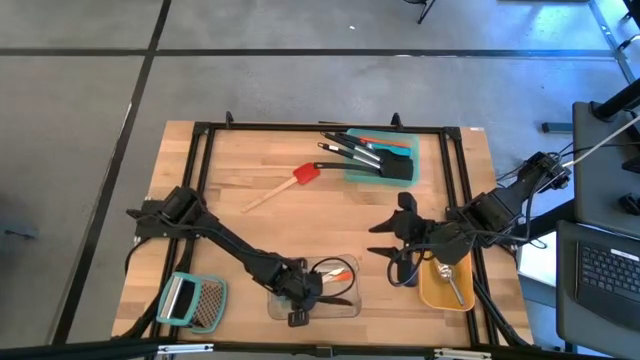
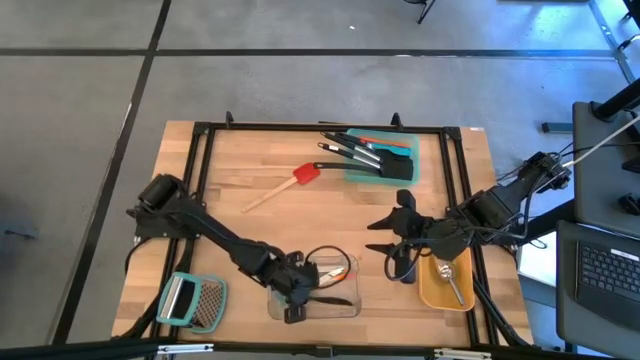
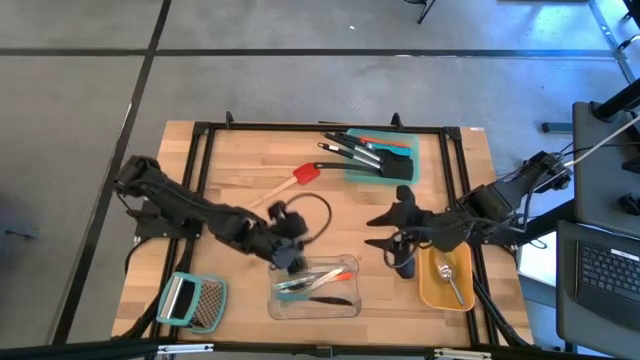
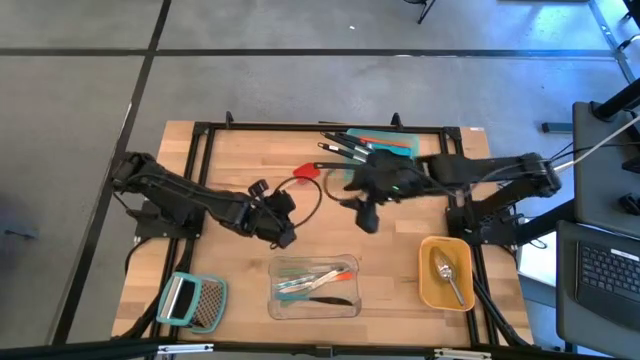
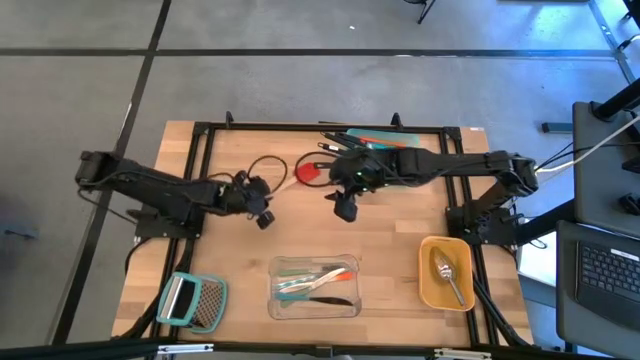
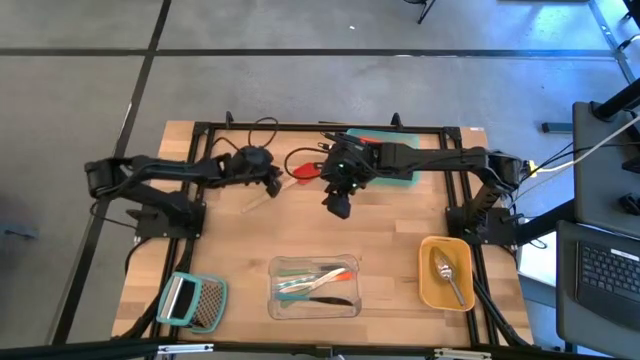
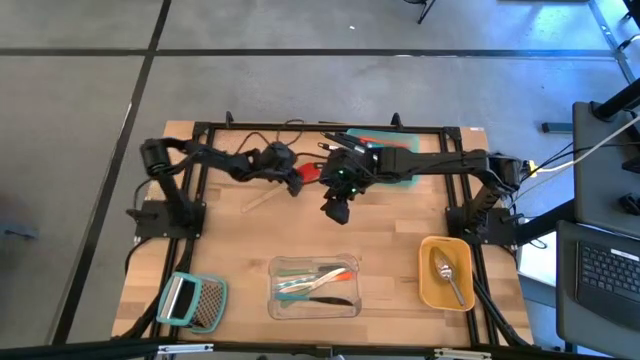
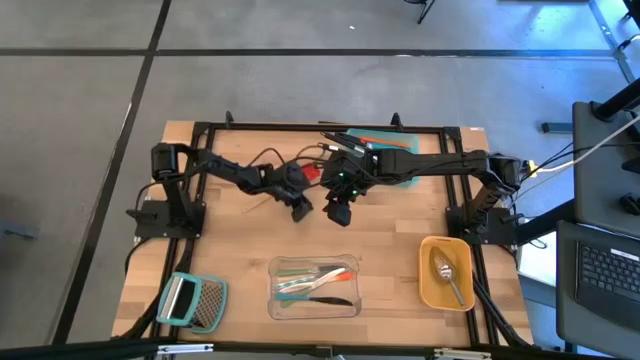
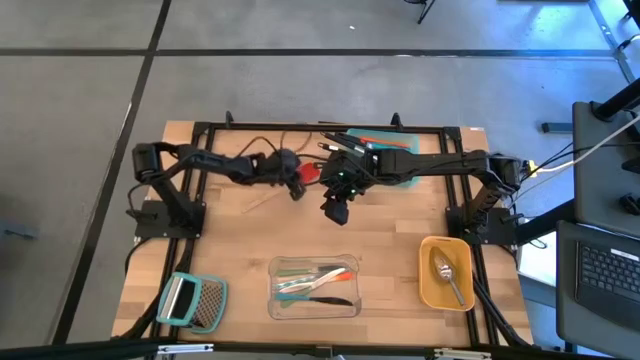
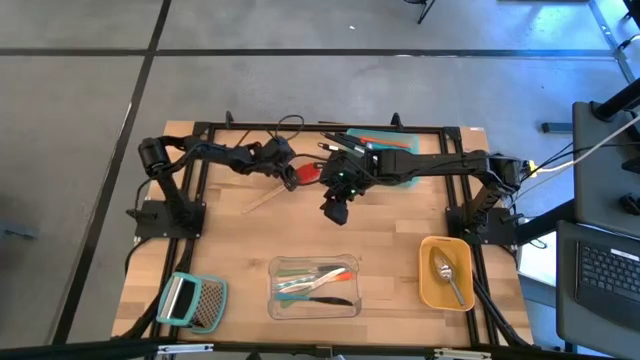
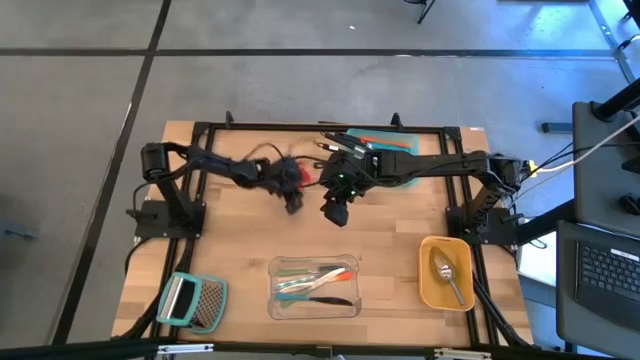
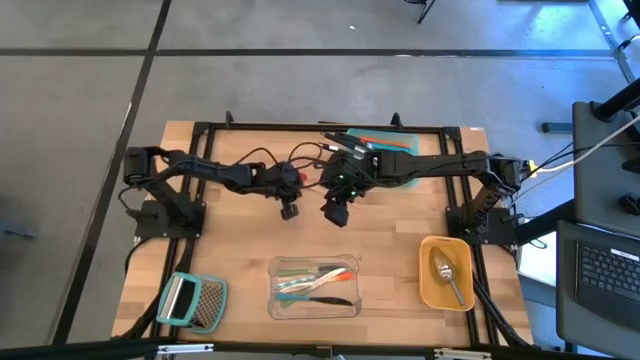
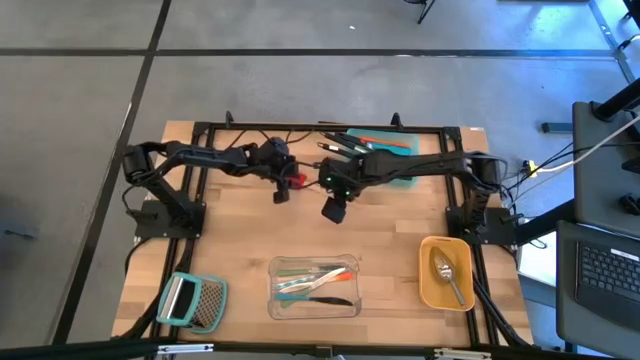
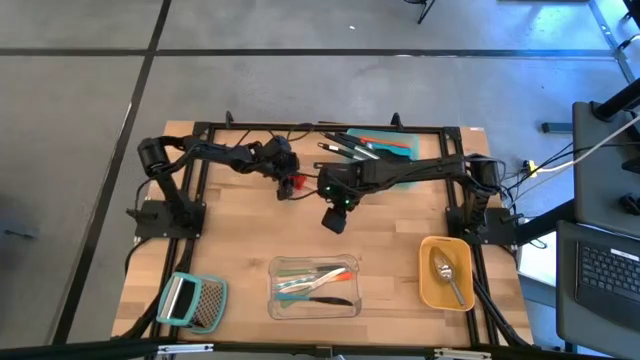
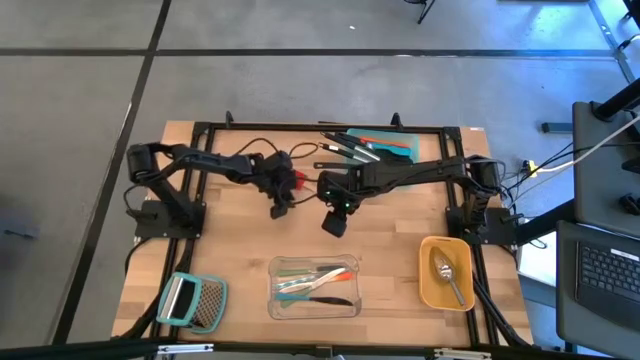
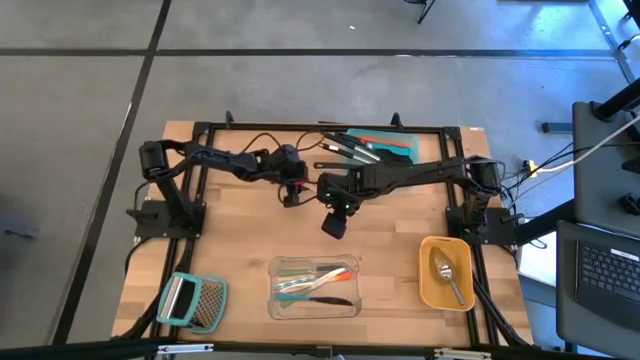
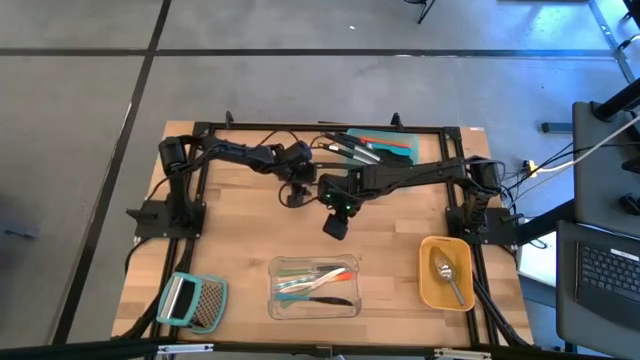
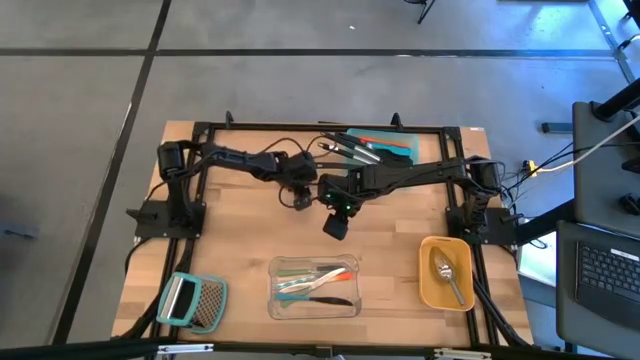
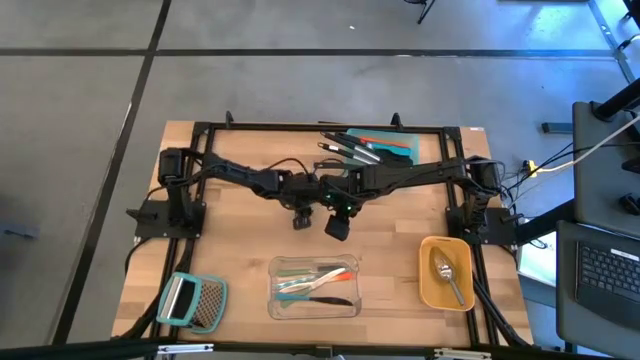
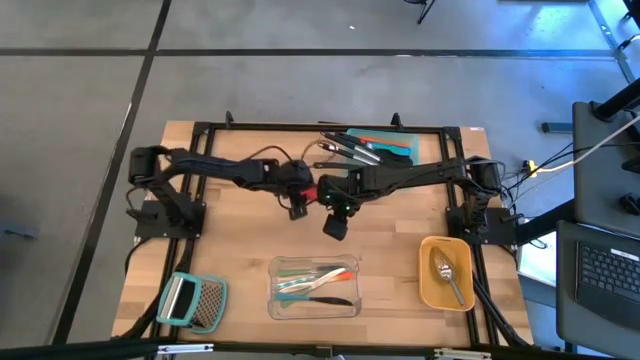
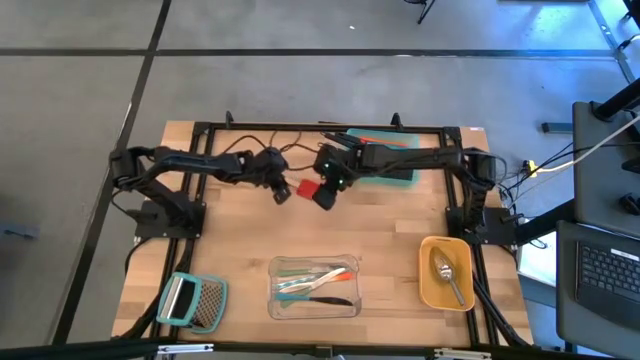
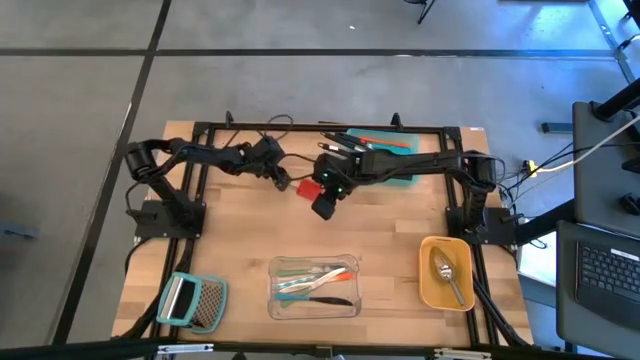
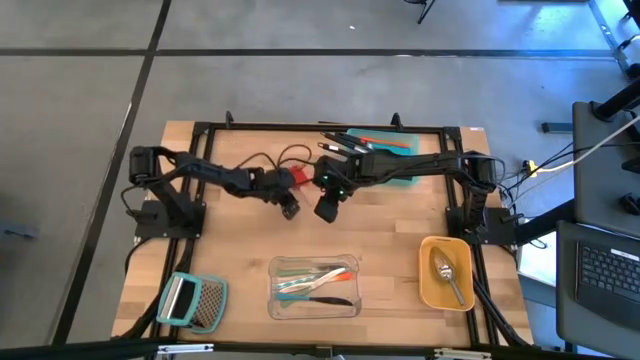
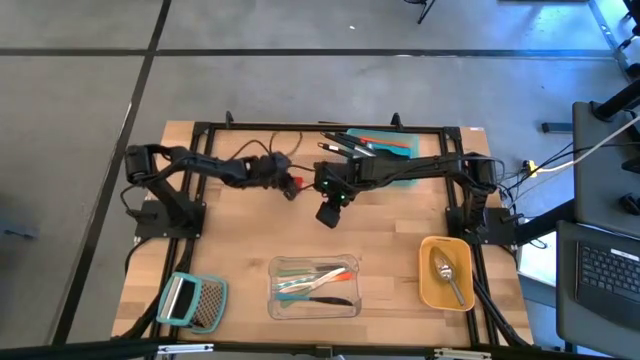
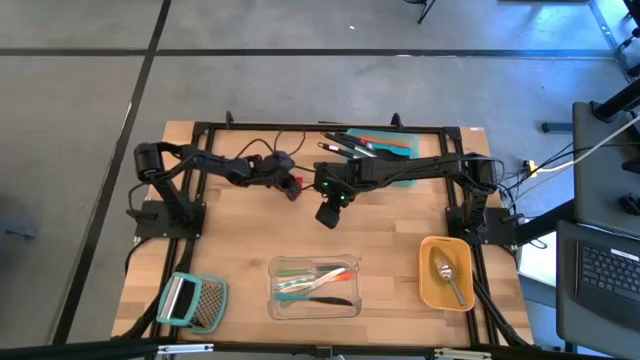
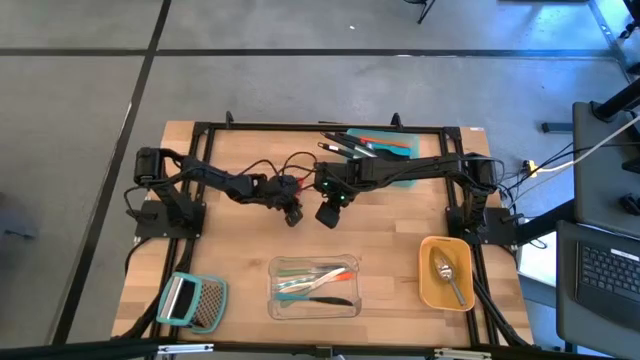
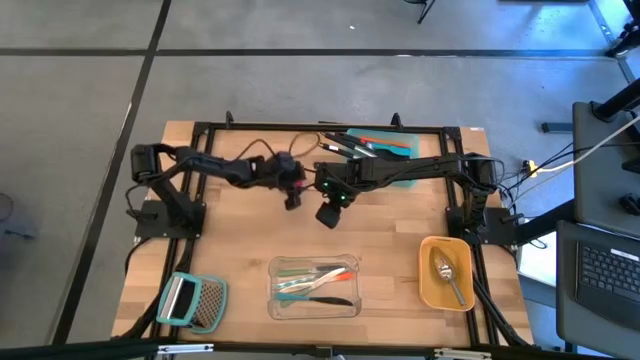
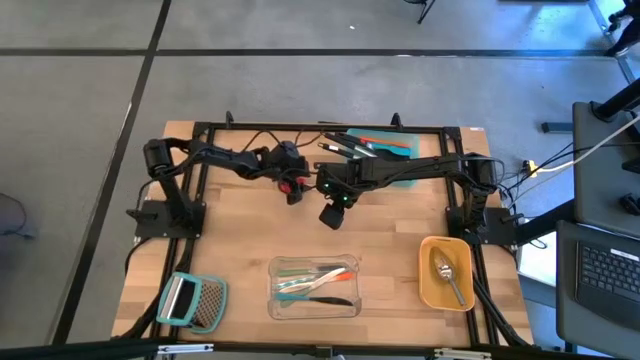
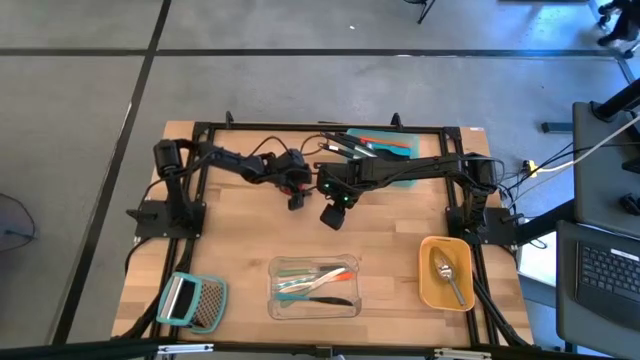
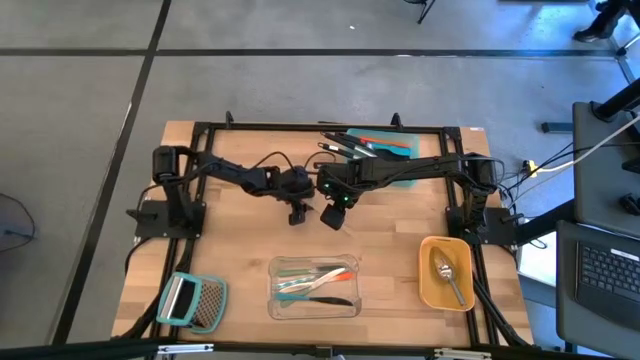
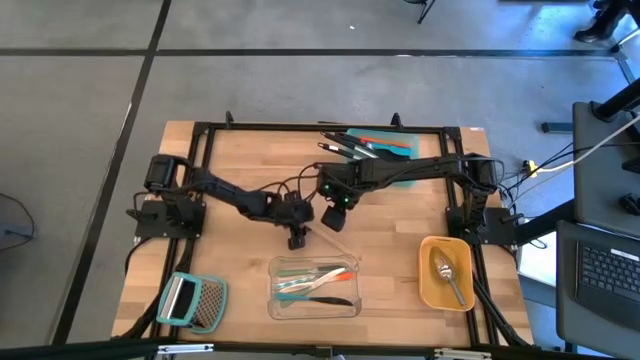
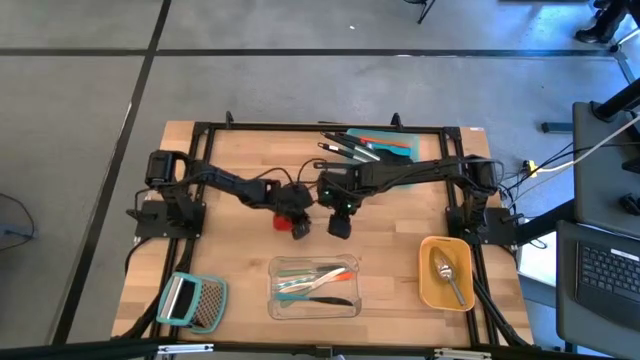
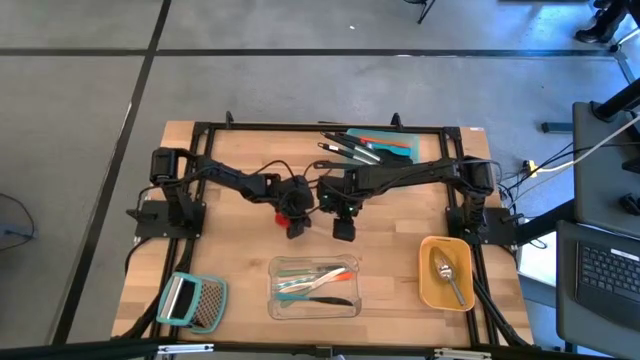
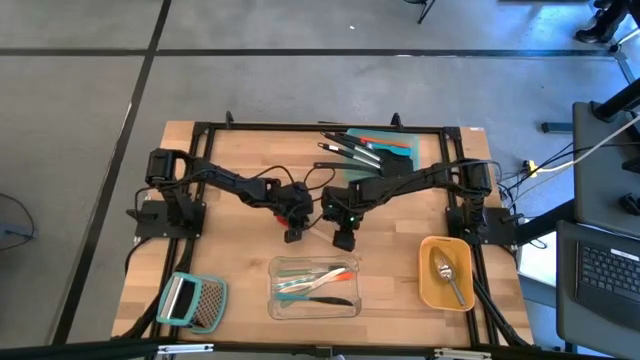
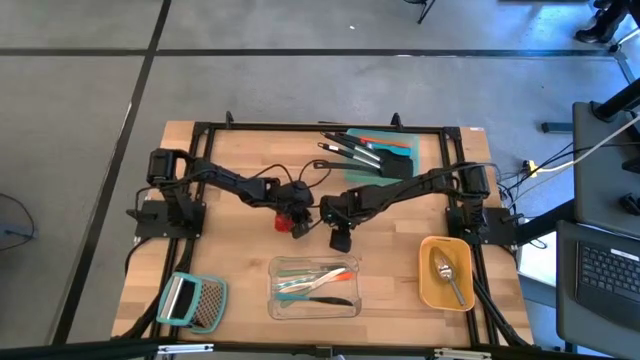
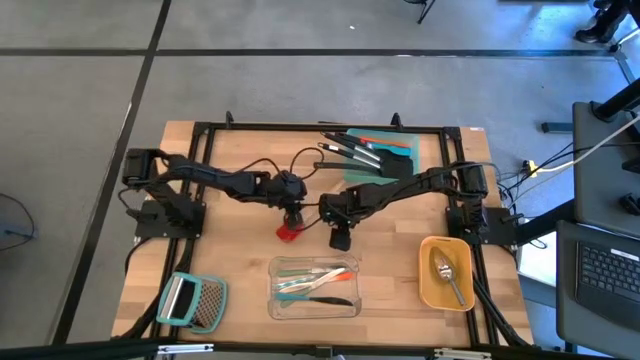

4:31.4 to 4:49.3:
Task: Pick & Place Kitchen Items
Put the red spatula into the green bin

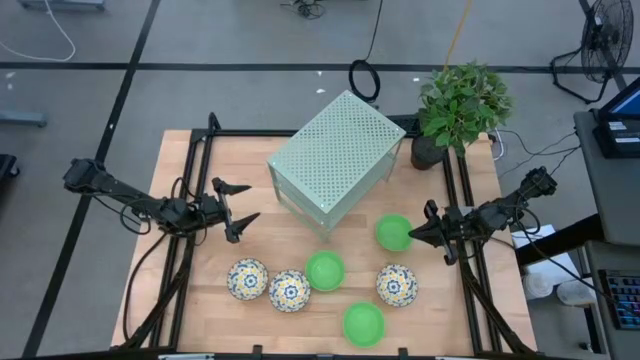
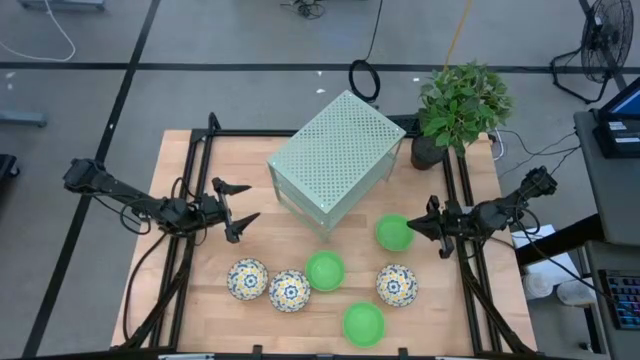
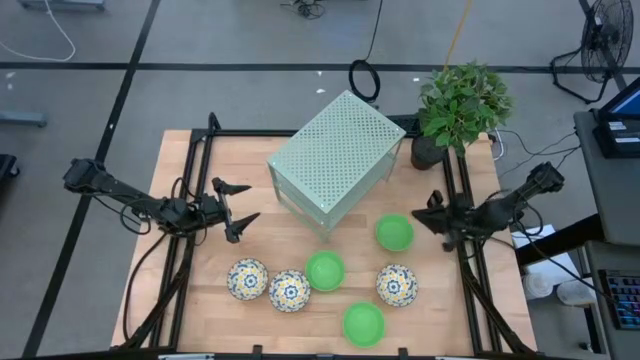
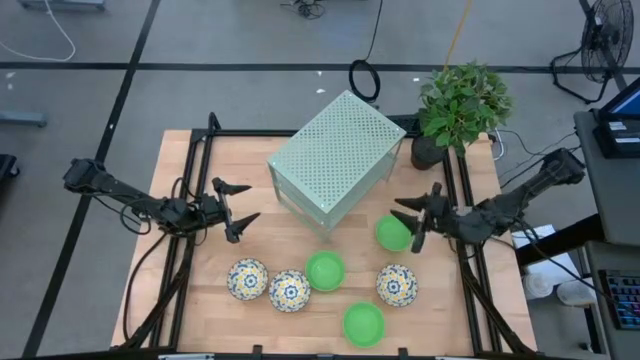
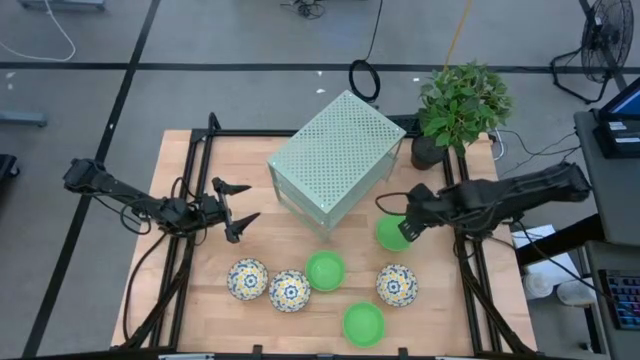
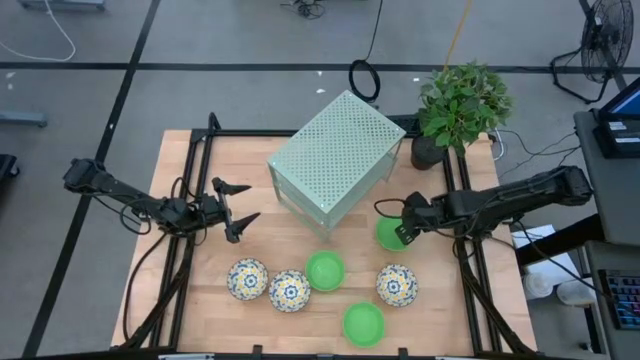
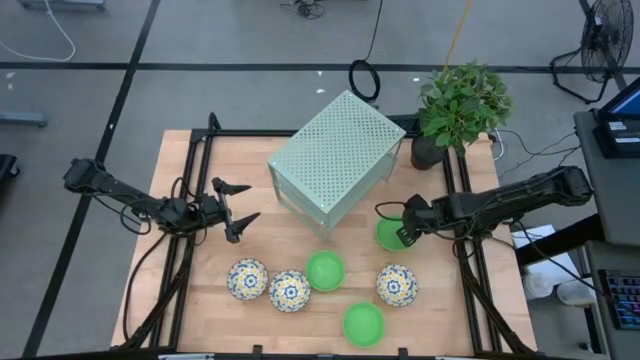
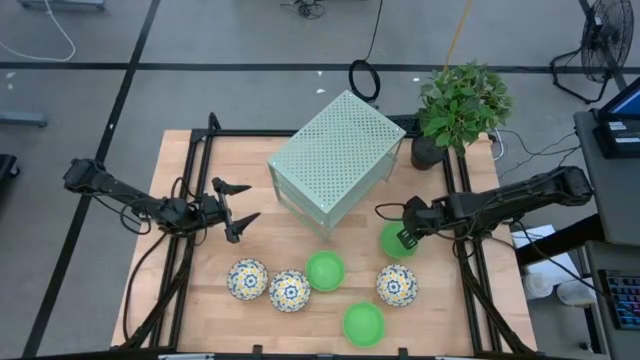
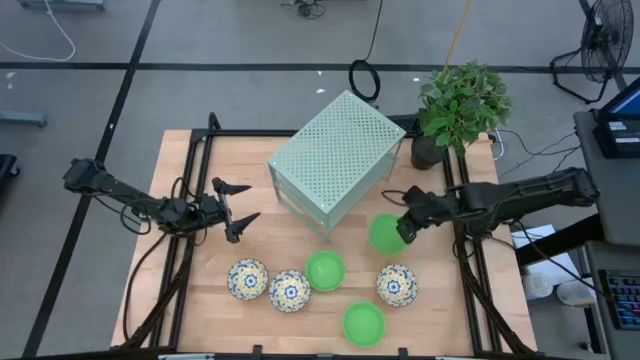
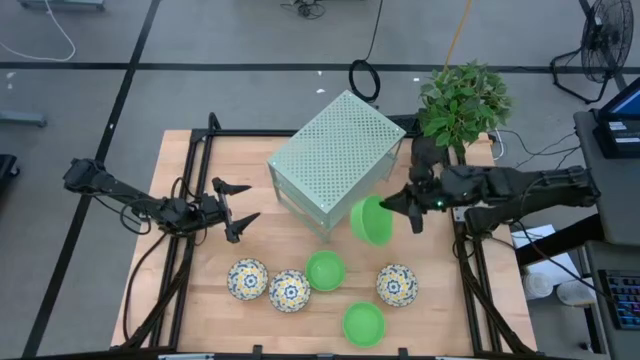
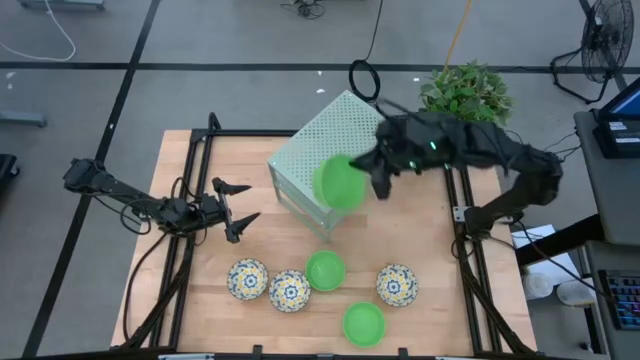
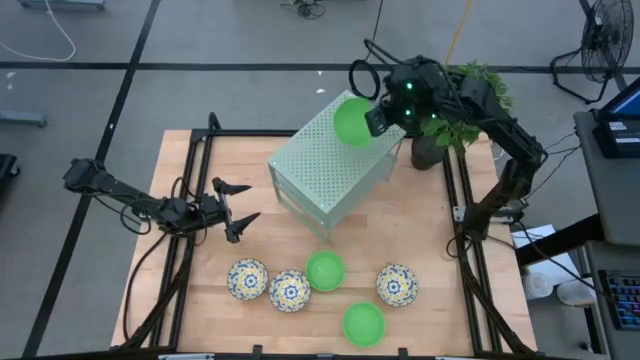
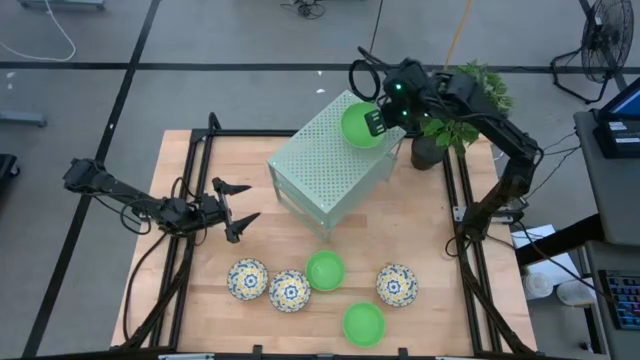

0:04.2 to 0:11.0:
Task: Pick & Place Mini bowls
Put the top green bowl on the shelf
